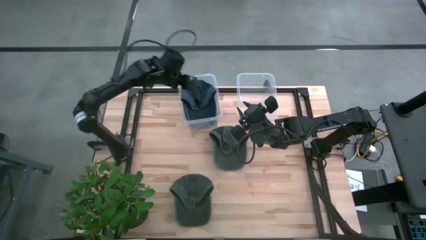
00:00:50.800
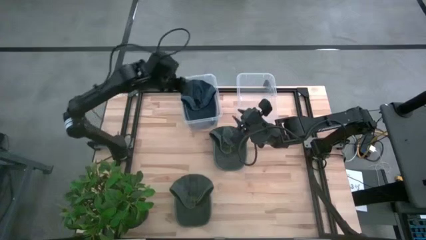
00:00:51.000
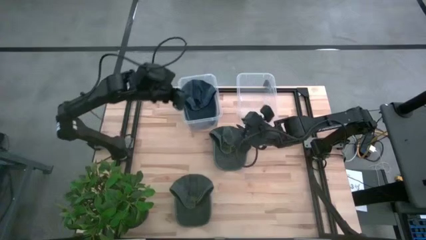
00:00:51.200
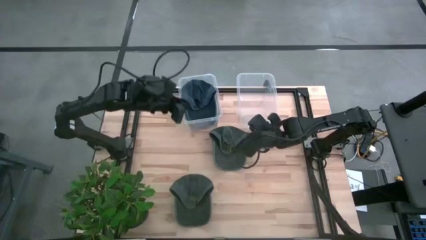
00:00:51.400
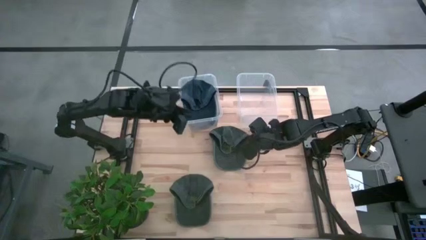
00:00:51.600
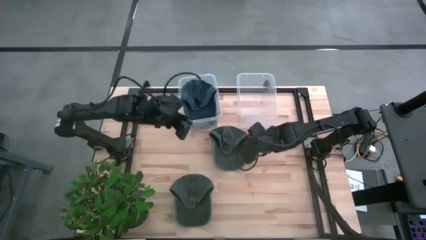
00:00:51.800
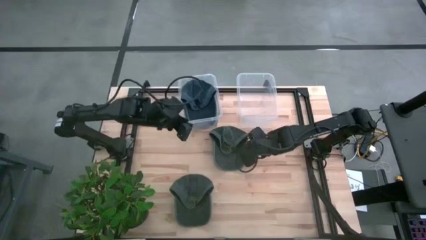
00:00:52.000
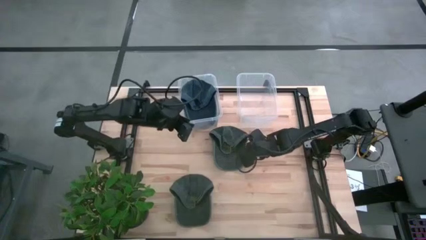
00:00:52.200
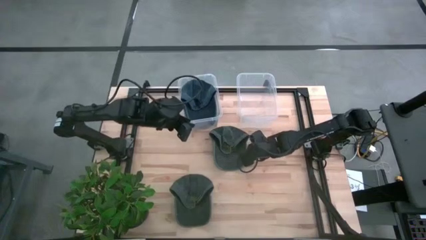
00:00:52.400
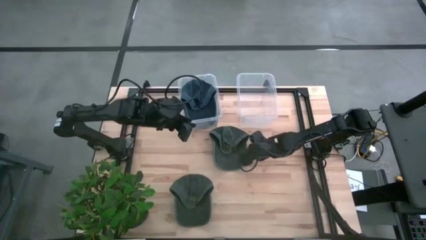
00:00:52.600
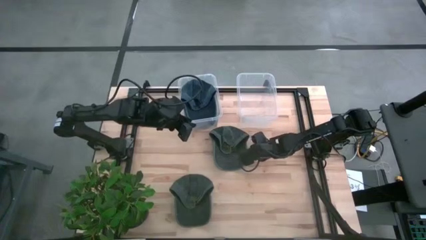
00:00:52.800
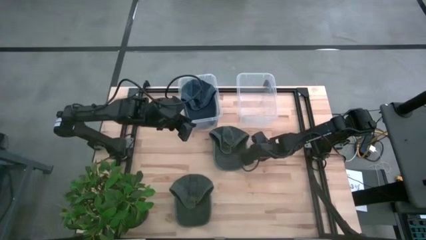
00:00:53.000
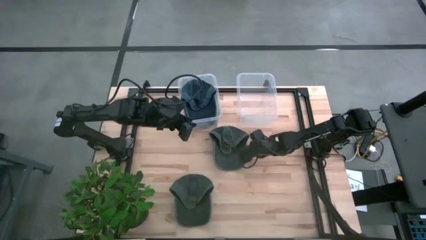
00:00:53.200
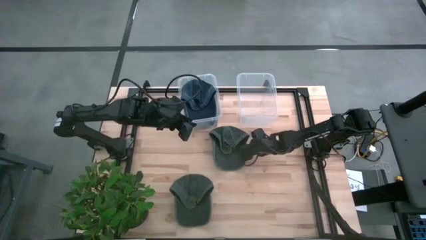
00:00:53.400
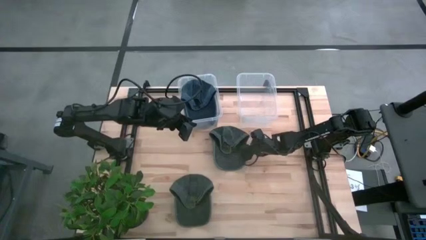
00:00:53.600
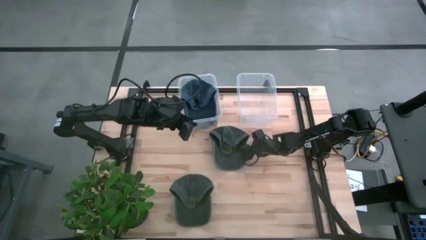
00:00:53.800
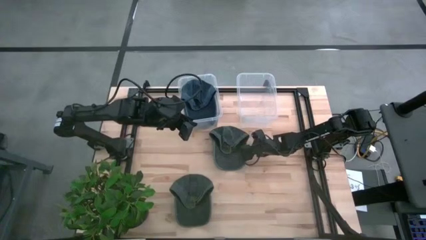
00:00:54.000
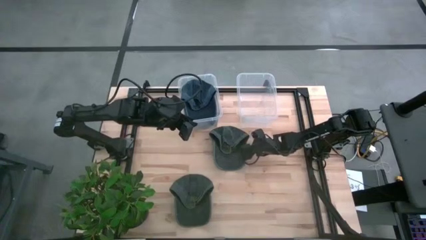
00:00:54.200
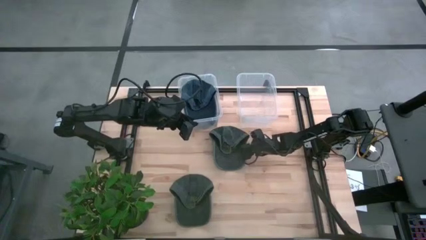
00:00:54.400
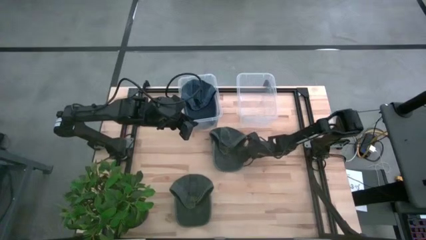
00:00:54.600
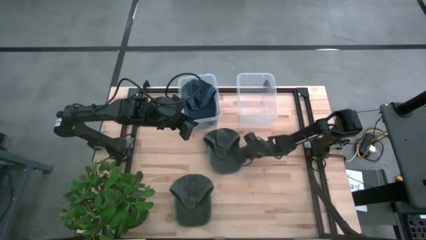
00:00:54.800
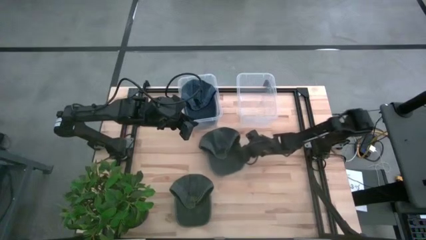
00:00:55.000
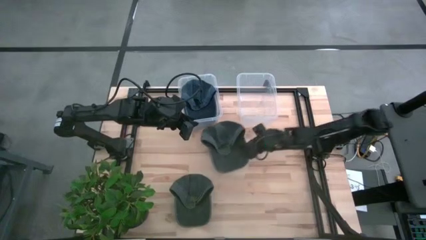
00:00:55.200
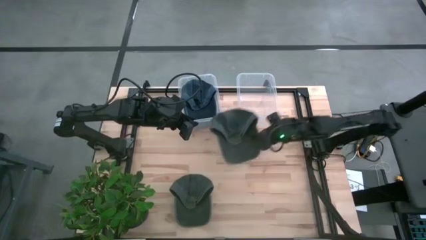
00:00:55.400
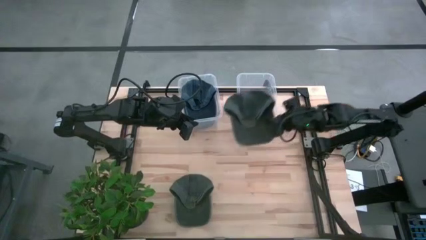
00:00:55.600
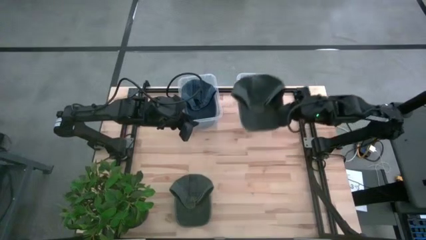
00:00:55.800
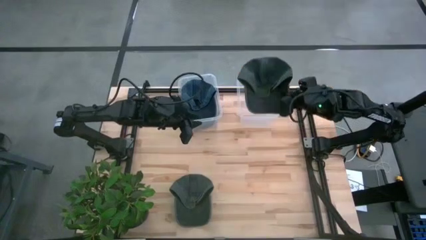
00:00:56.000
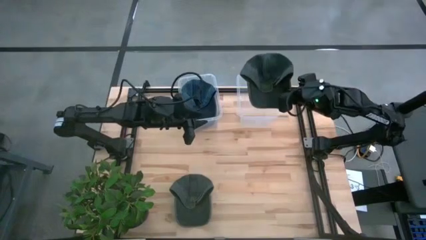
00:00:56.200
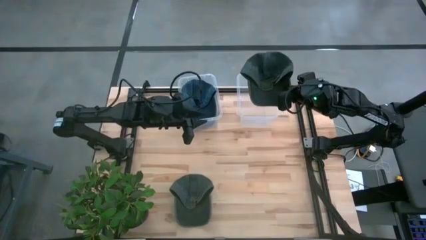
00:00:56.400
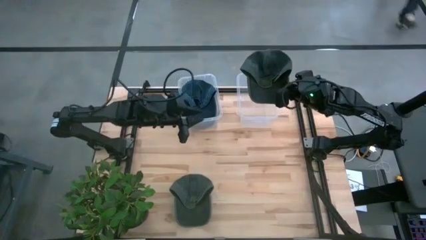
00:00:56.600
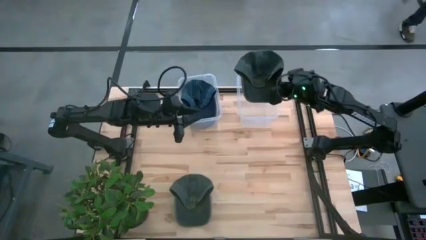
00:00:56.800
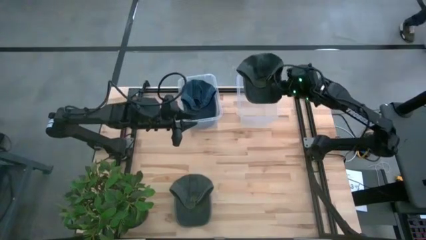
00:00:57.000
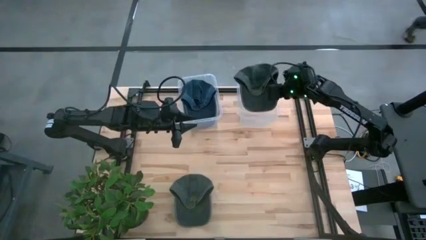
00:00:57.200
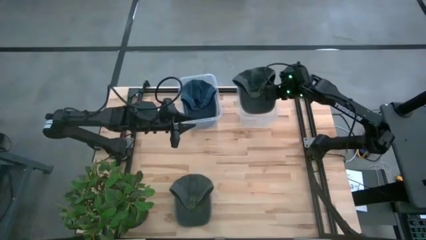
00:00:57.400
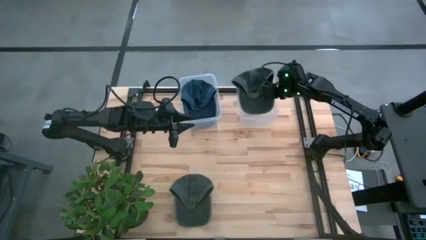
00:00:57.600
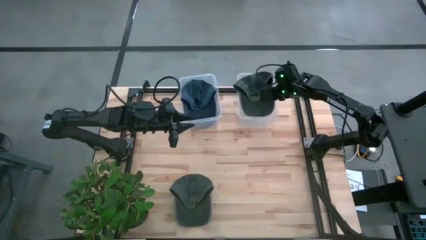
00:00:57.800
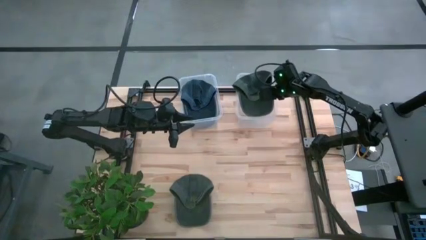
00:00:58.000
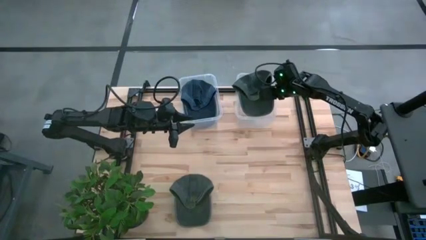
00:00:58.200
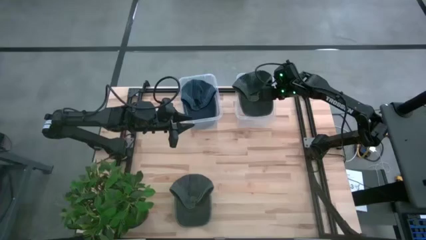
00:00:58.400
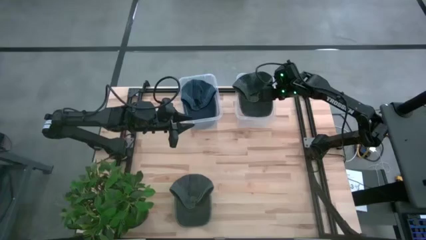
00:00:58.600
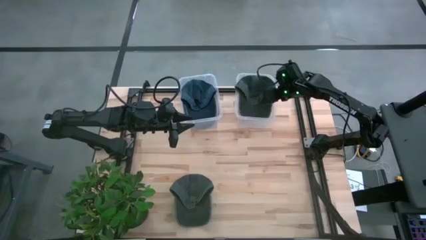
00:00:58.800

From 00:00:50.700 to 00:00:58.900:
Task: Pick & Place hat
Put the top gray cap into the right transparent bin

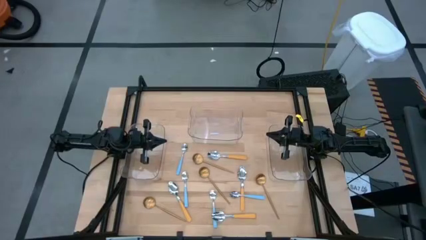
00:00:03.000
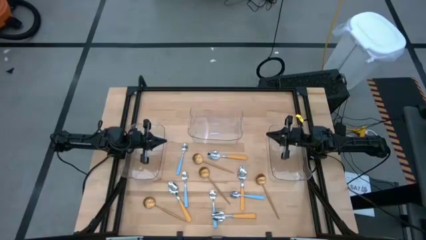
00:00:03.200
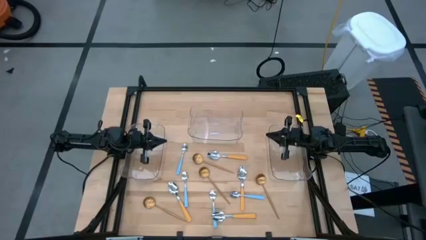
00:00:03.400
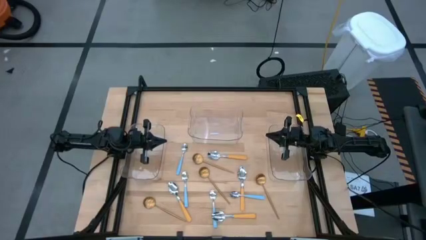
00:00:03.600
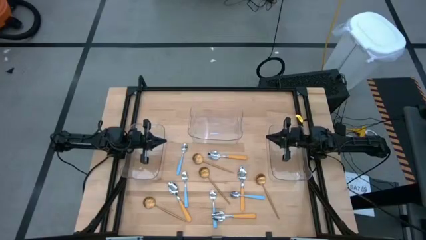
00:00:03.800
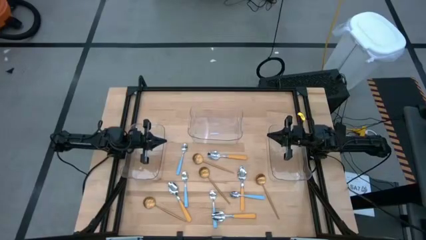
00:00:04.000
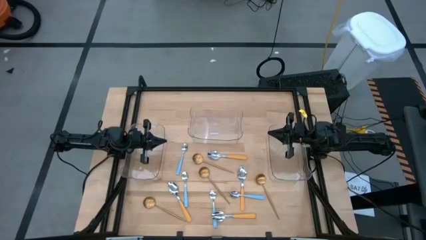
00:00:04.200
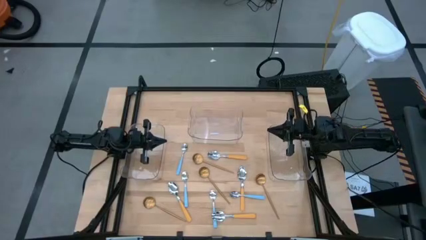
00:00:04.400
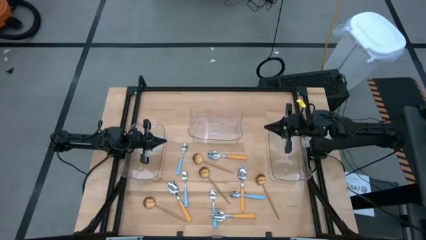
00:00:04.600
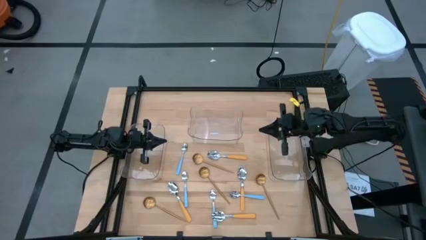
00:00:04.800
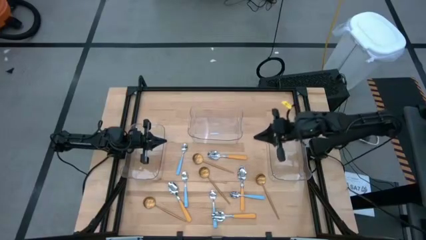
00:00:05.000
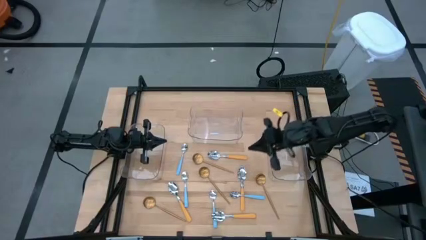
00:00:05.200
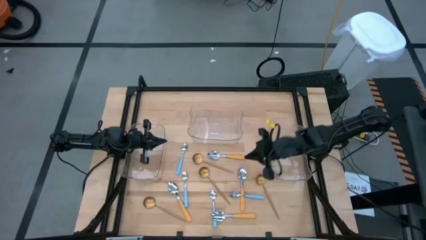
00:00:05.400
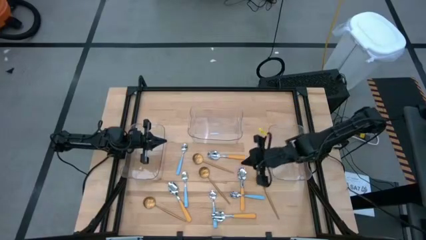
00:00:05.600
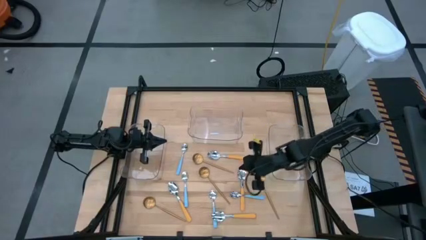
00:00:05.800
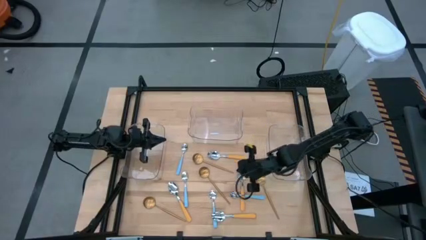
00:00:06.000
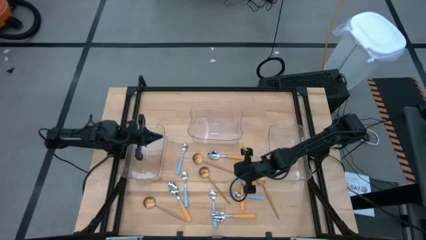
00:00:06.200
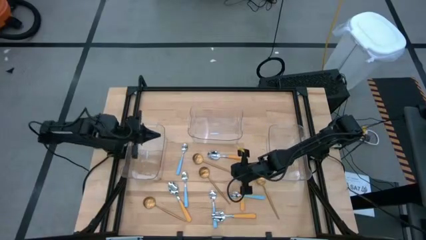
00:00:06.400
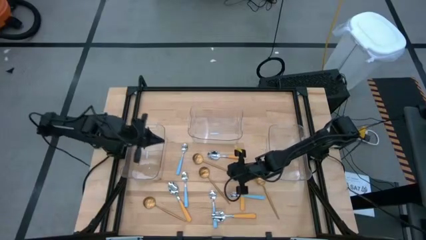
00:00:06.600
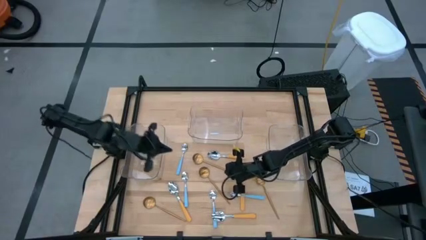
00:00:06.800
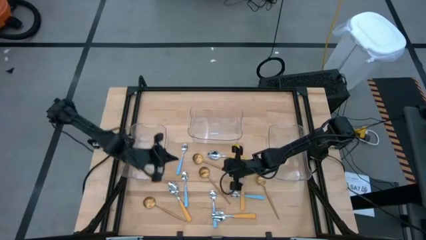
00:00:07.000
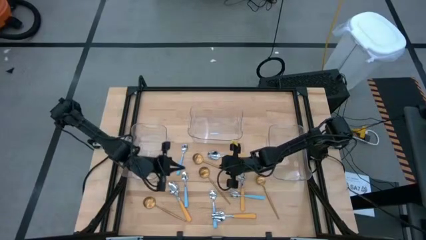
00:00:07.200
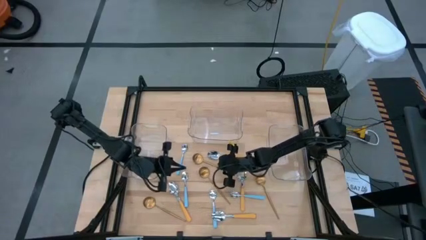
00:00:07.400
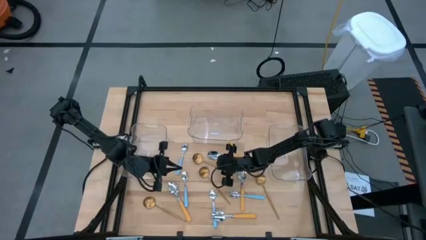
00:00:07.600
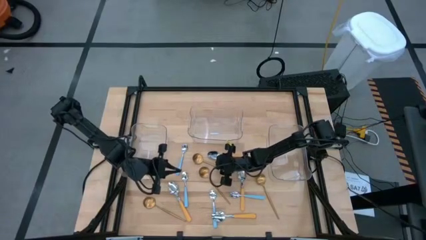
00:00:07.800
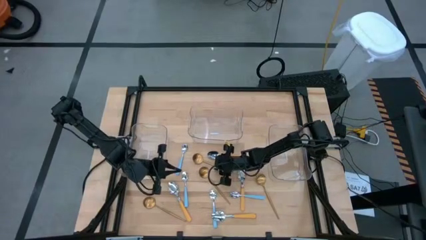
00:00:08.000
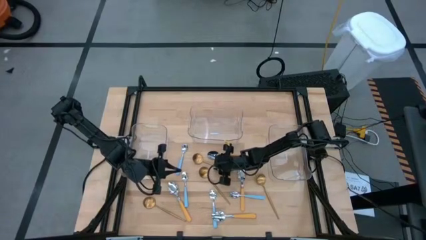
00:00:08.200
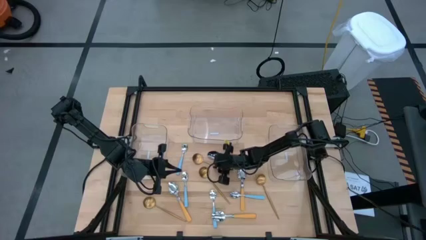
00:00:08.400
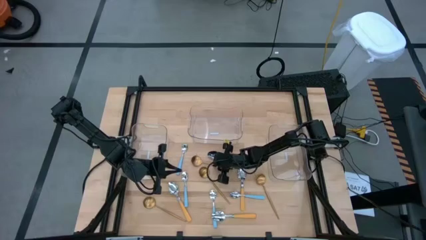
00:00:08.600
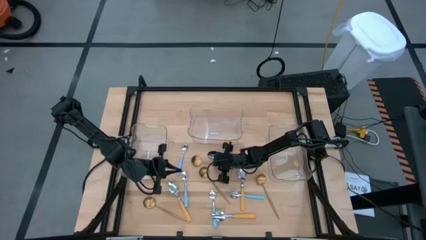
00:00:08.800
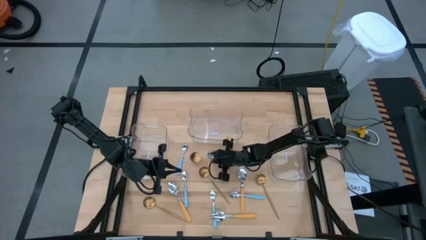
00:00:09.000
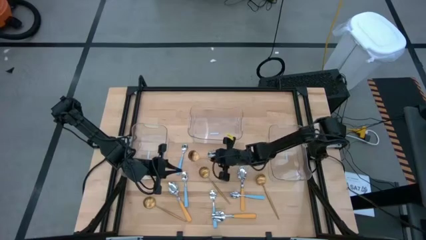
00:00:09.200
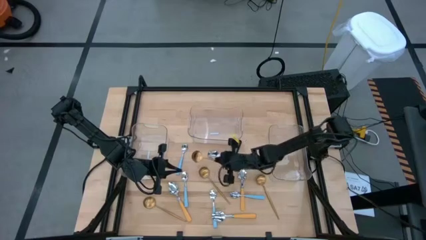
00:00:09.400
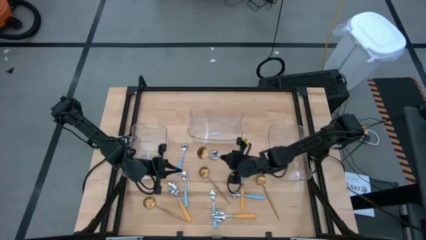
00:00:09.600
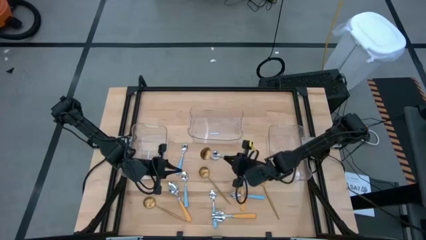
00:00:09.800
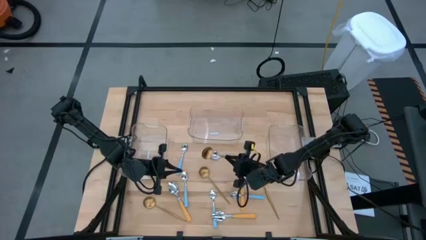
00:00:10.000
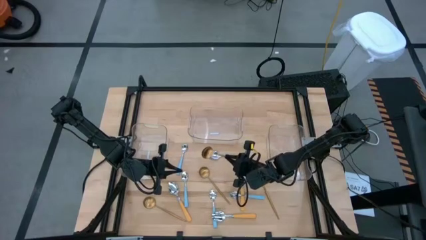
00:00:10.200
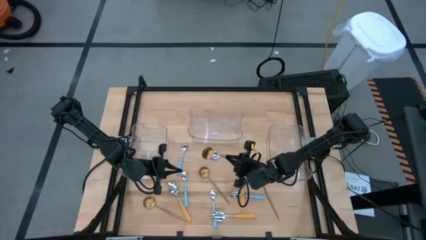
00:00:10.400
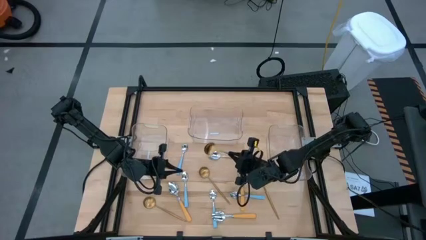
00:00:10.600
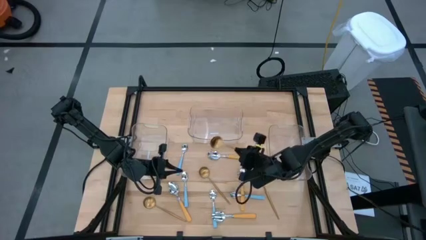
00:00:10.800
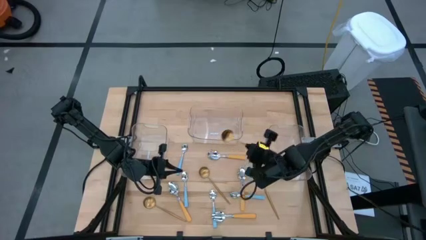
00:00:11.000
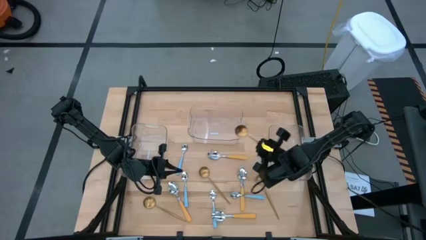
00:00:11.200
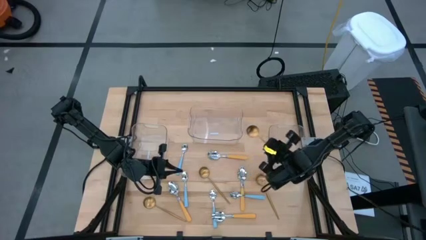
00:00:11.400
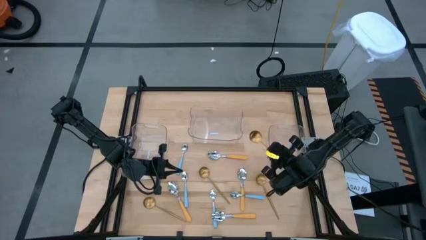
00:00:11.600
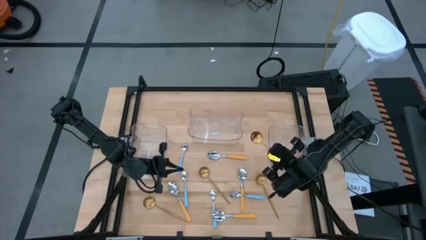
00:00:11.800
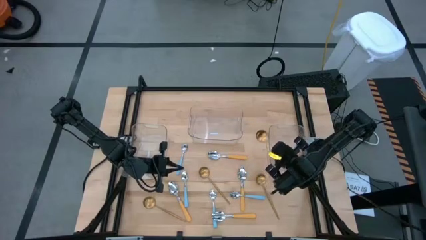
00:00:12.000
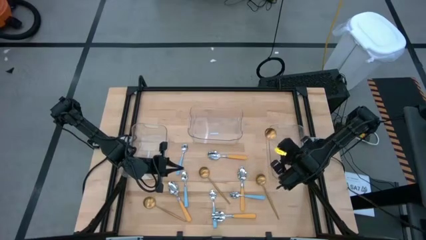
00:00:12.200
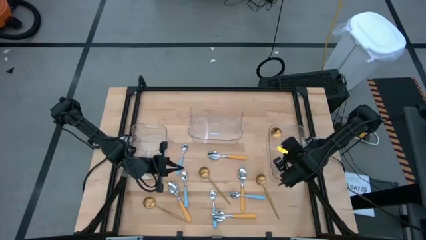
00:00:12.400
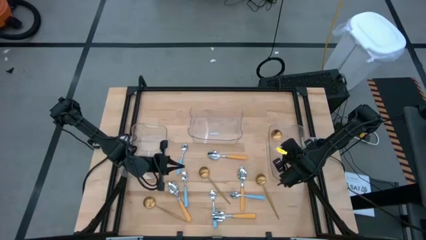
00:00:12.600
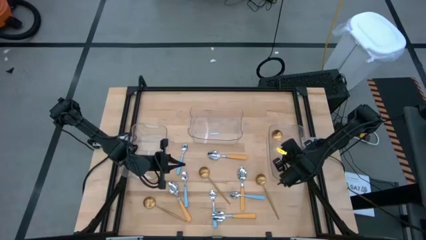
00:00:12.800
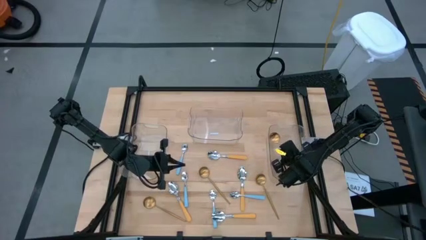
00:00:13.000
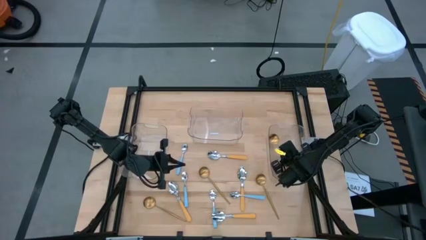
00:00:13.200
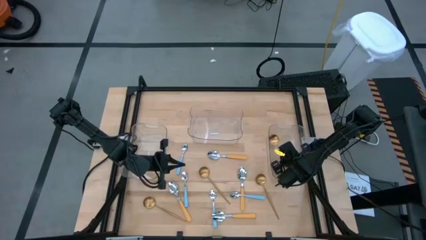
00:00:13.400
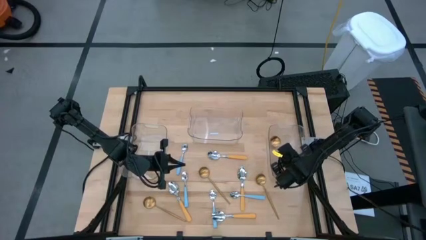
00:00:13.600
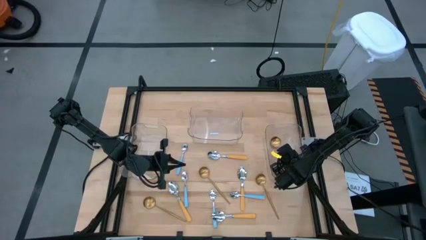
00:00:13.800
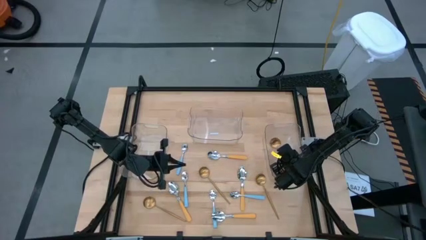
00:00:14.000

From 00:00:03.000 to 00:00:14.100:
Task: Sort silverware by color (type)
Put the gold spoon into the right transparent bin
